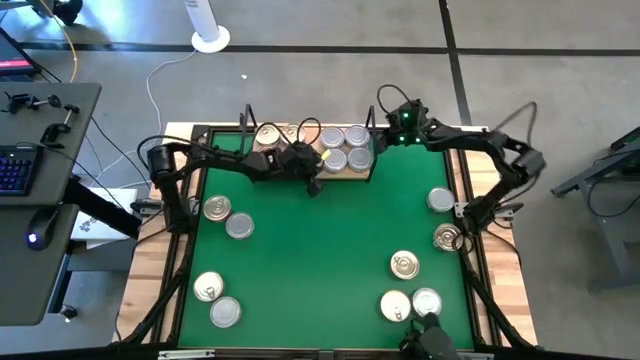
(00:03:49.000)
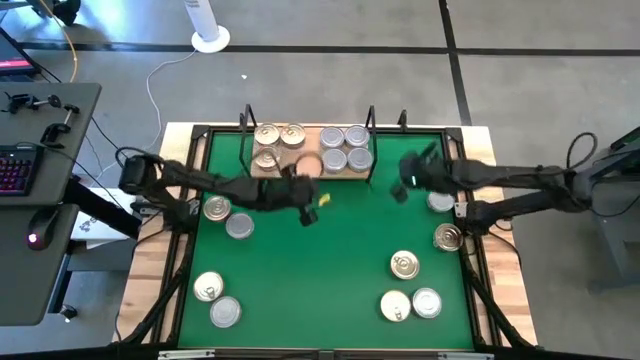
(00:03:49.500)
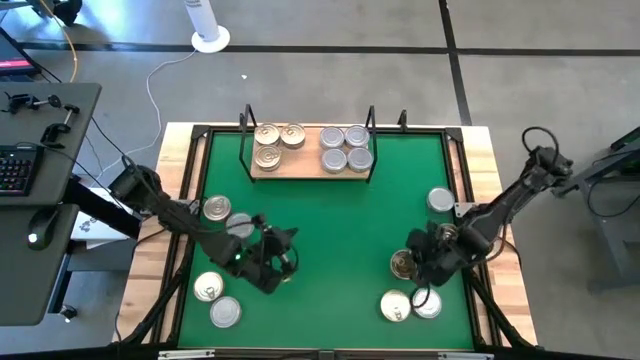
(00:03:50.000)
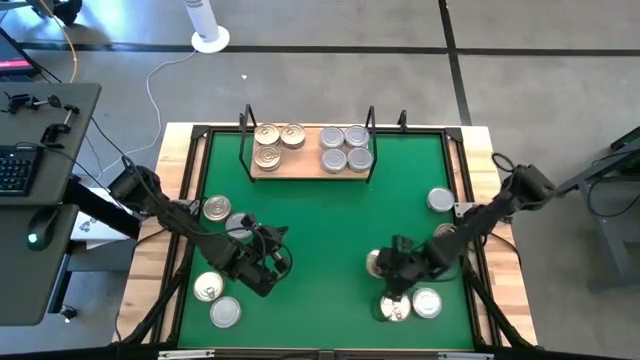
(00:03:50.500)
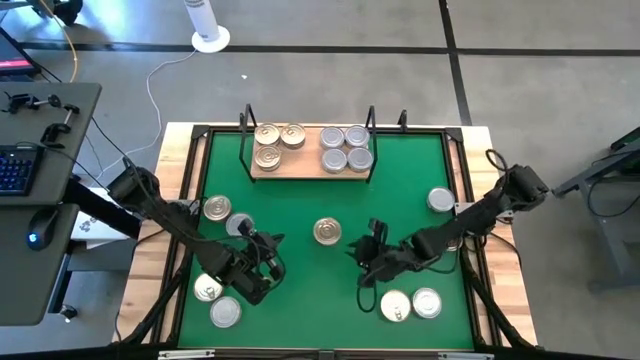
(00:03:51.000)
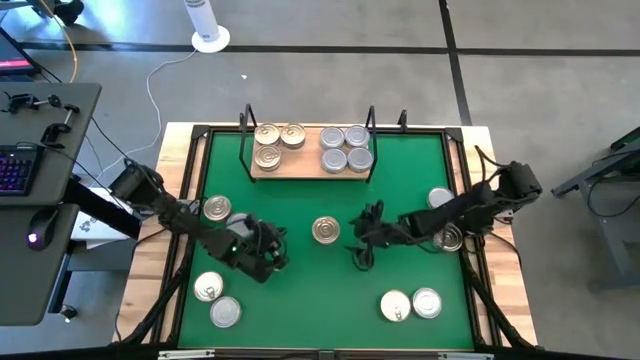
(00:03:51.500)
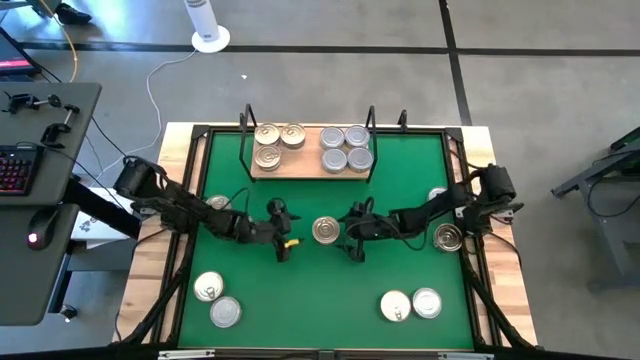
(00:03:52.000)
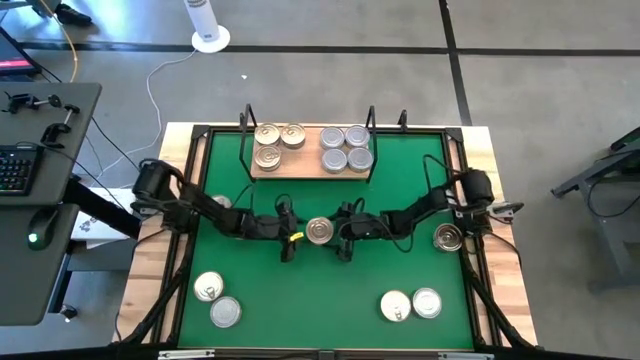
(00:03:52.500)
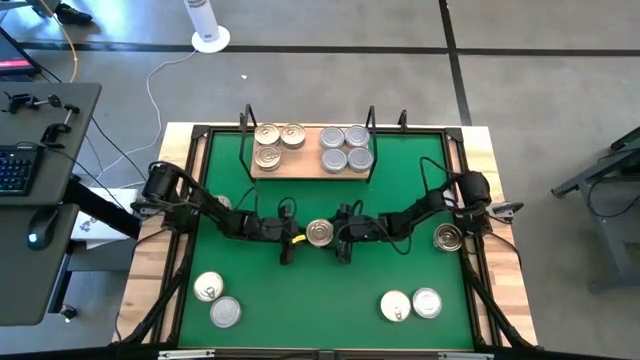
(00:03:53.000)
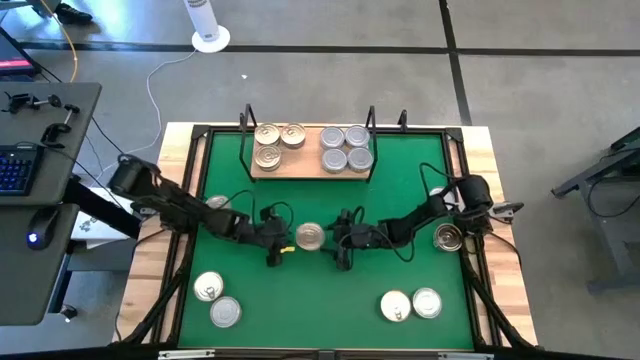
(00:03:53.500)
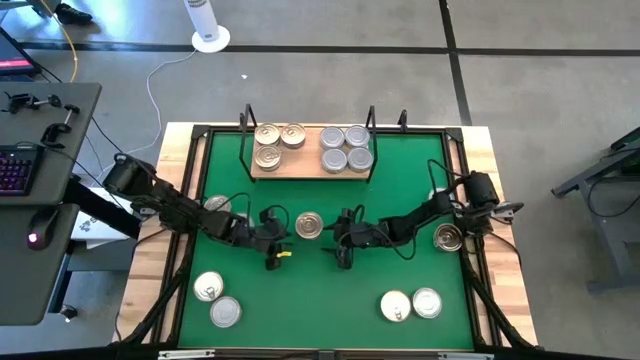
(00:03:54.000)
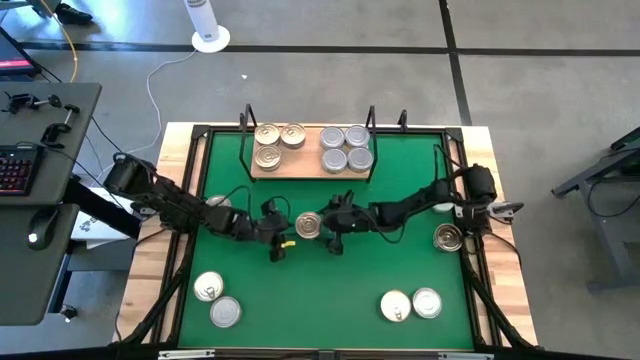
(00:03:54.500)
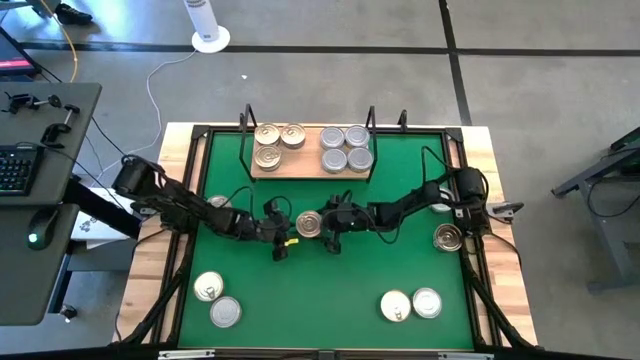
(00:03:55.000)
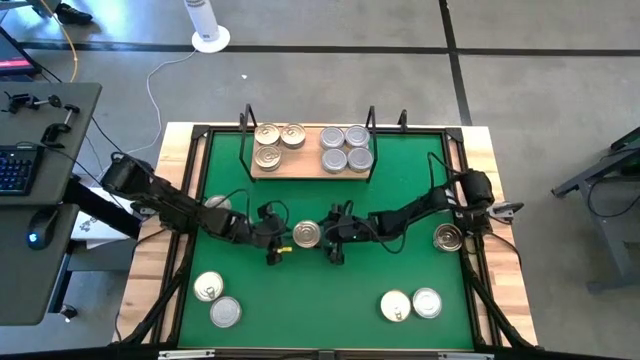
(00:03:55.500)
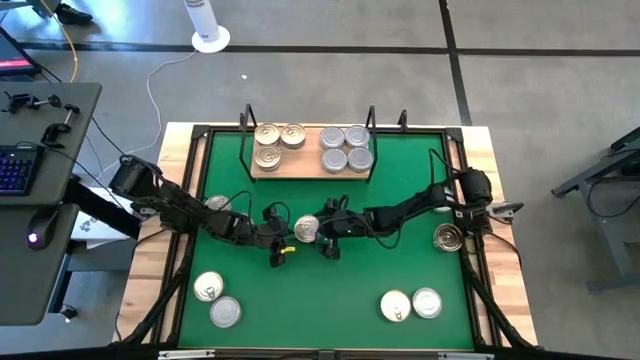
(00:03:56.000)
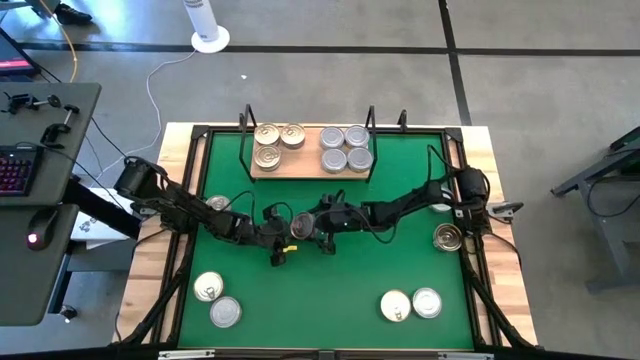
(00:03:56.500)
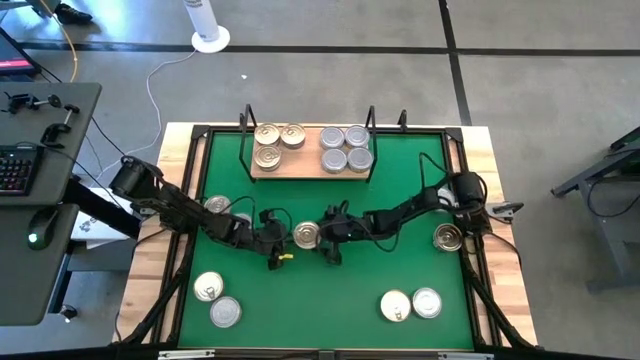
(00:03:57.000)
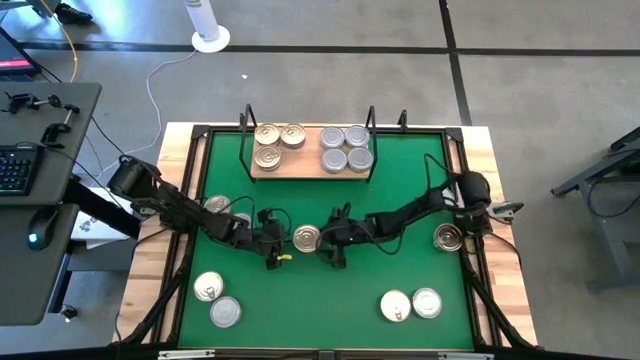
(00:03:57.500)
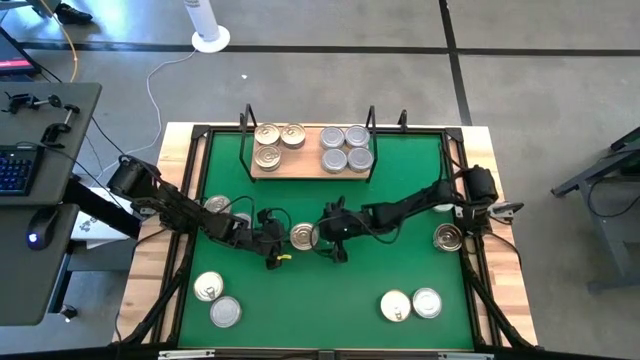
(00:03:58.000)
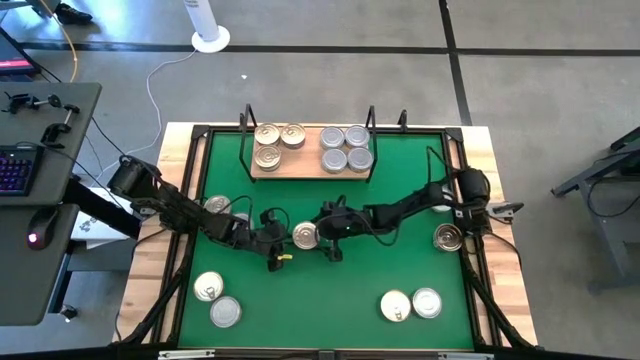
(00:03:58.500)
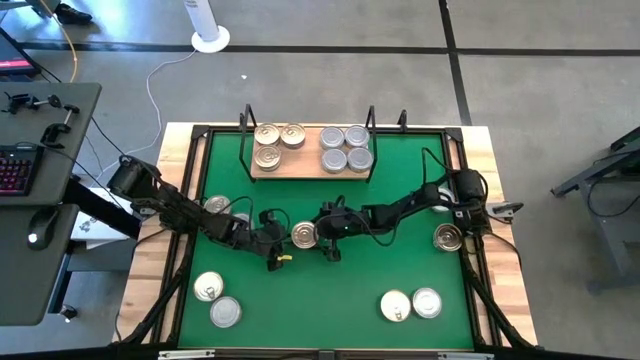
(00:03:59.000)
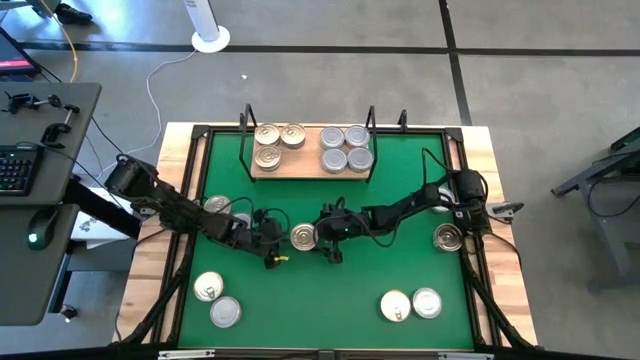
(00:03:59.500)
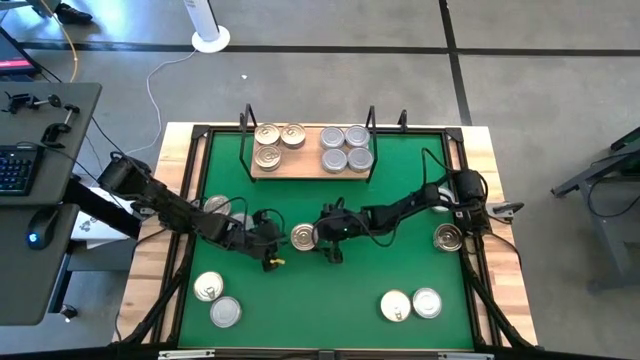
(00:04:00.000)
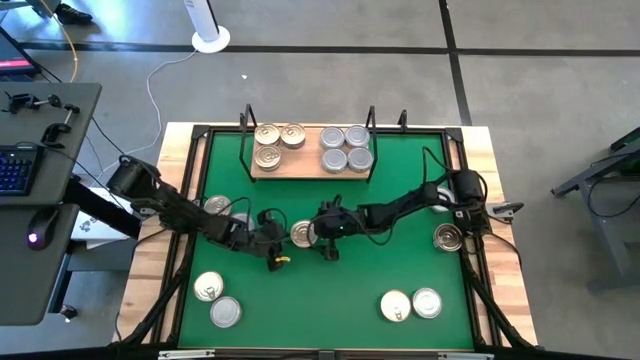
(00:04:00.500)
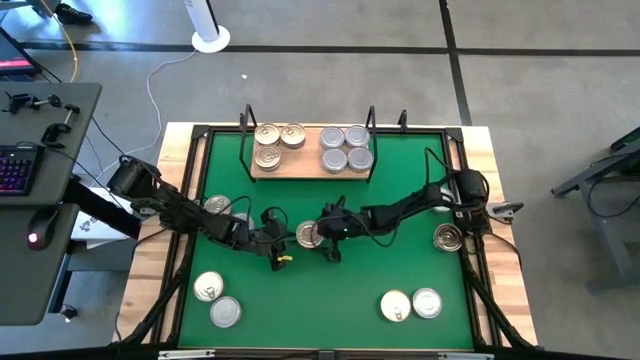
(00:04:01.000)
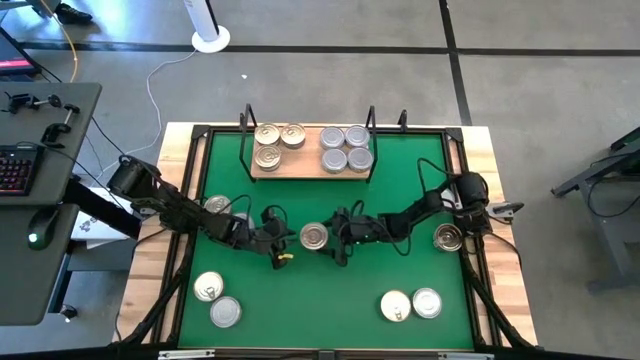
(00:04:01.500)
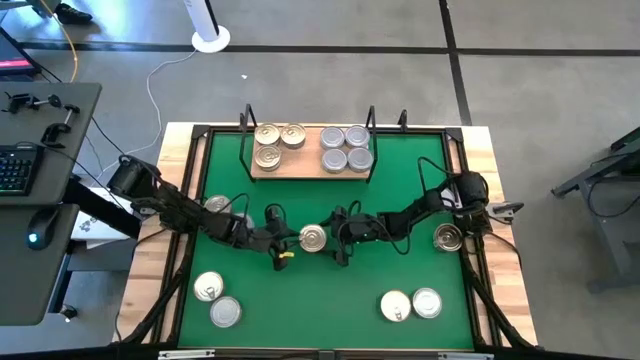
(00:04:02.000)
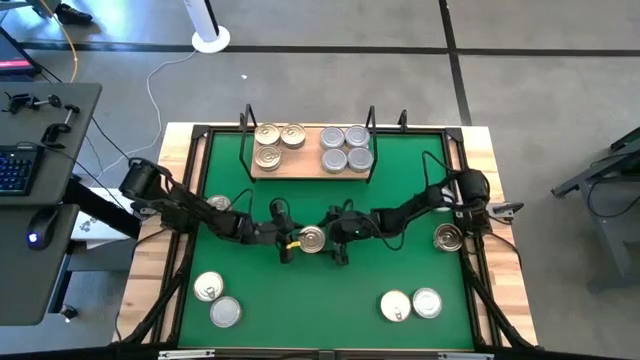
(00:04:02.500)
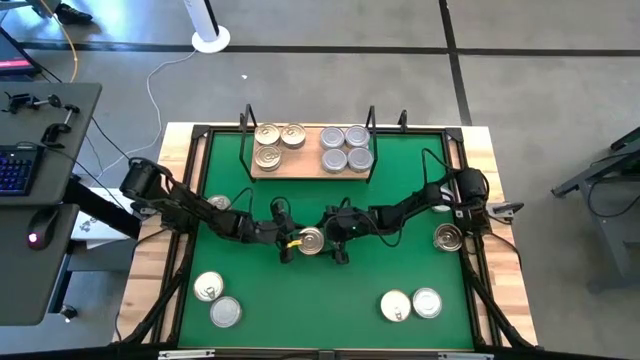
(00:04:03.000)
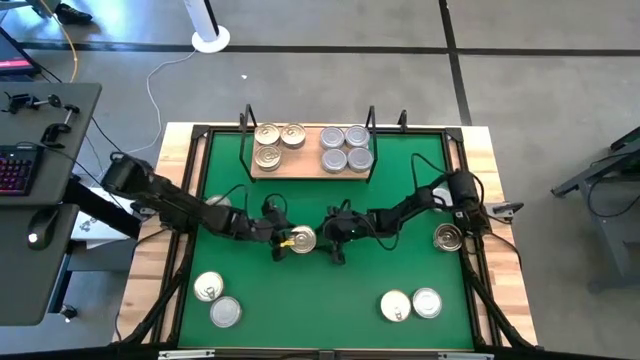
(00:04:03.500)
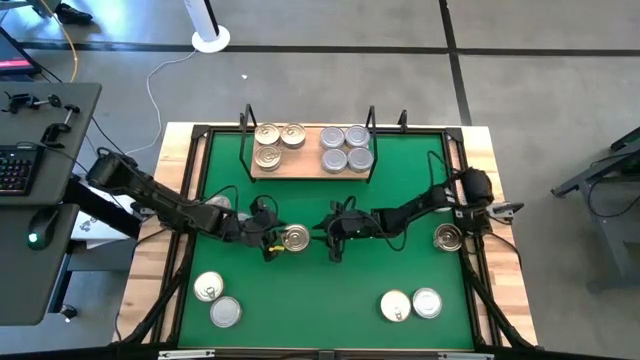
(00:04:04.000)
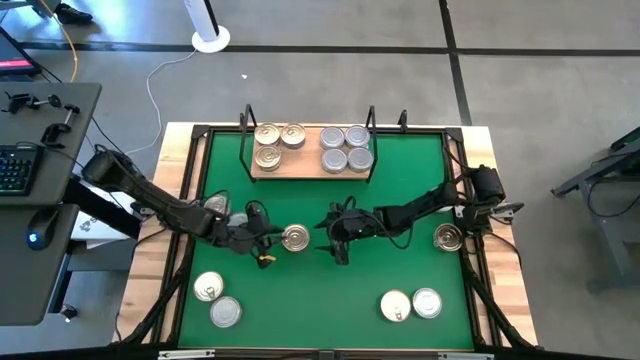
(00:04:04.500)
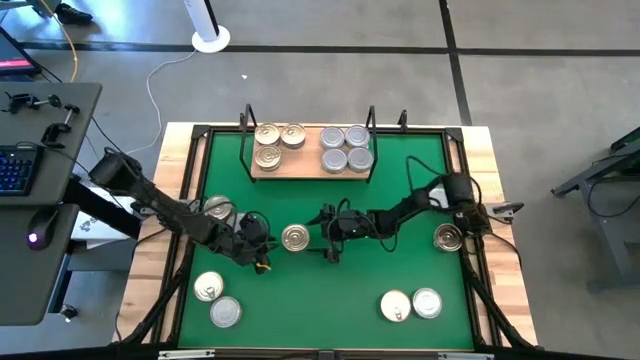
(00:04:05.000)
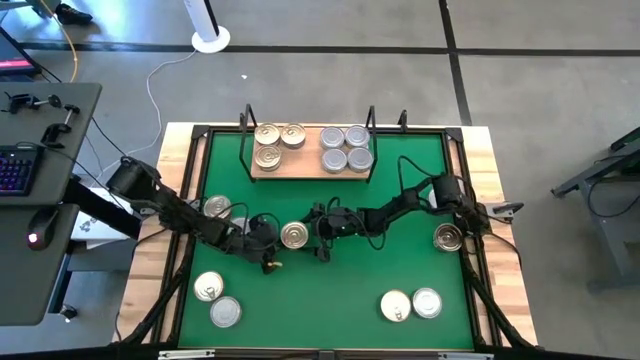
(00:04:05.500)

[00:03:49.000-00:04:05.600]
Task: Stack canned seafood by type on shelf
Put the blue/pink tuna can on the shelf and align with the other blue/pink tuna can

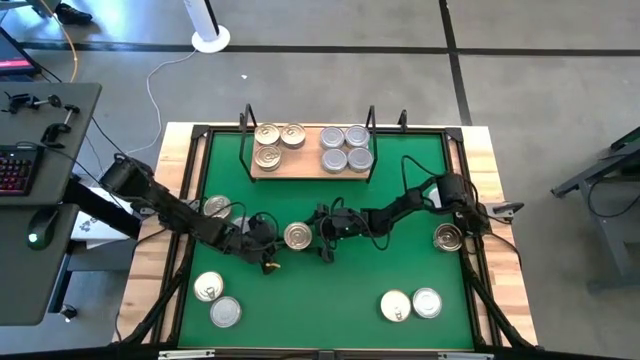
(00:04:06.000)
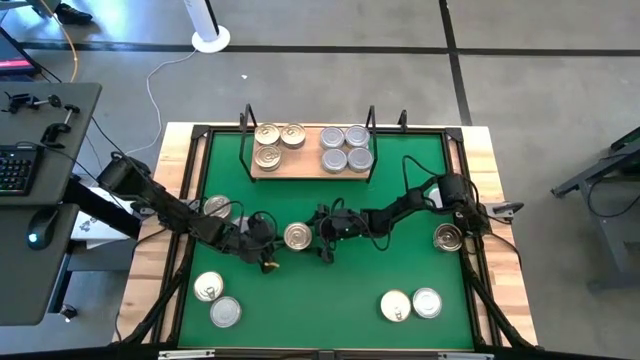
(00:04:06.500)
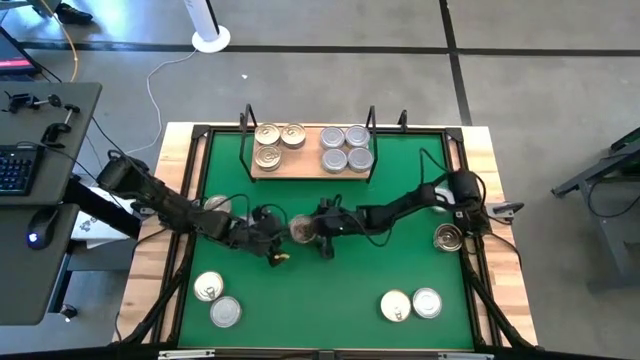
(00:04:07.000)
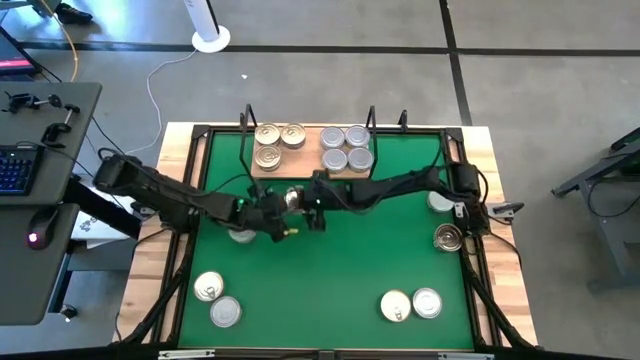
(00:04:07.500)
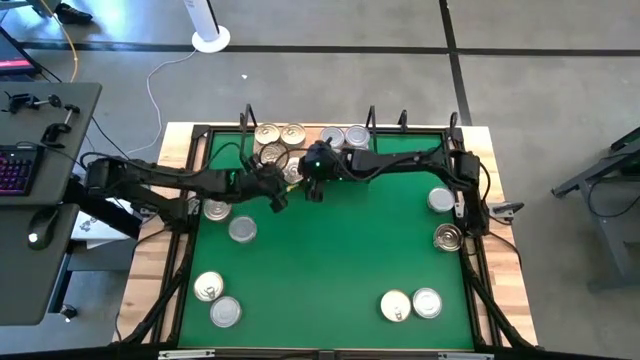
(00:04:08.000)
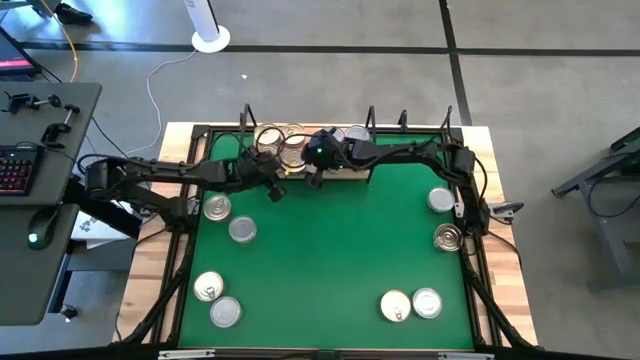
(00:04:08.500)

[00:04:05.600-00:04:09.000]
Put the blue/pink tuna can on the shelf and align with the other blue/pink tuna can

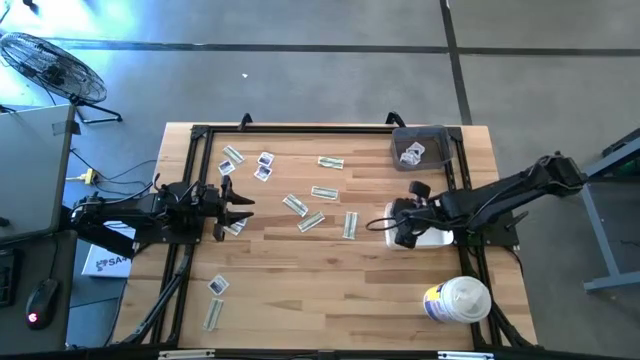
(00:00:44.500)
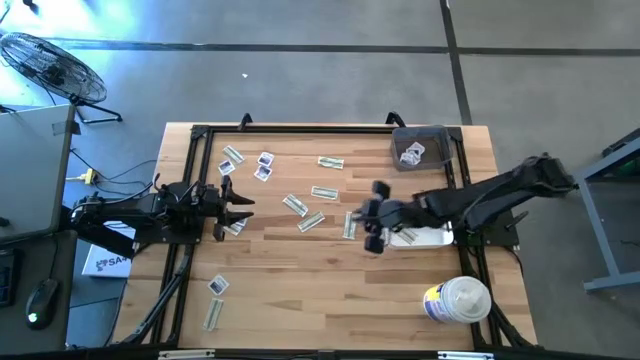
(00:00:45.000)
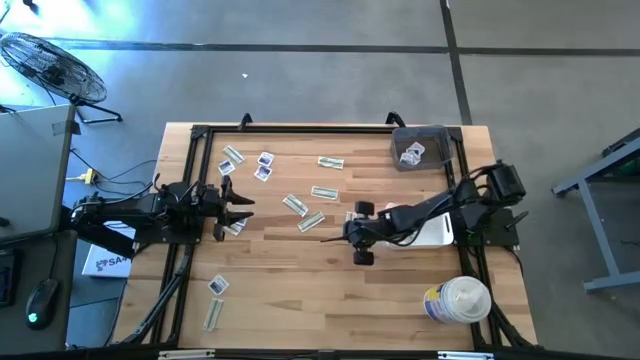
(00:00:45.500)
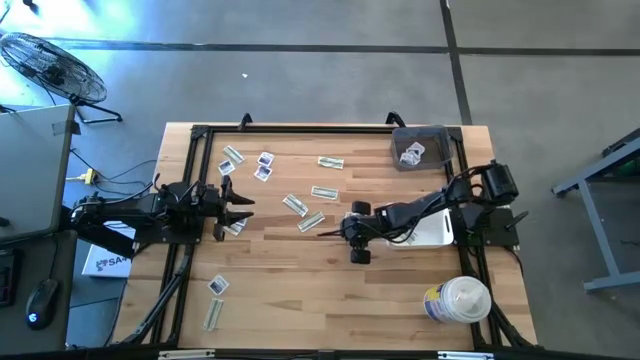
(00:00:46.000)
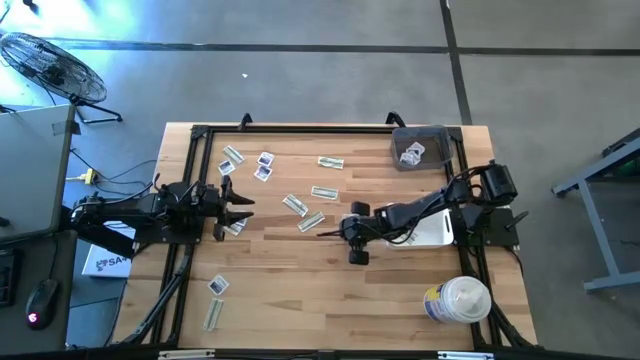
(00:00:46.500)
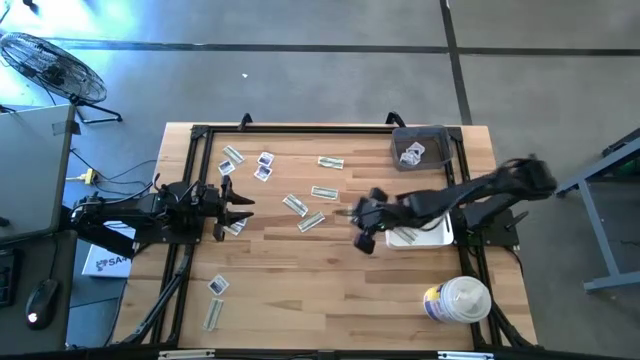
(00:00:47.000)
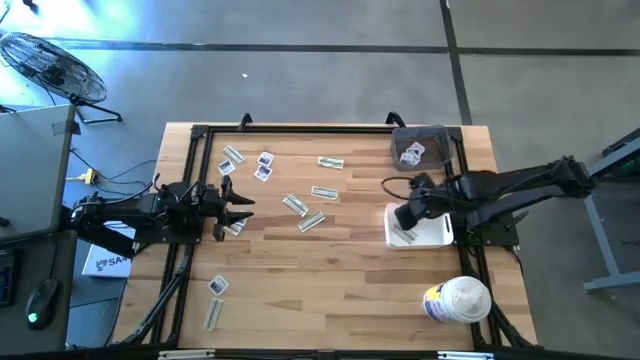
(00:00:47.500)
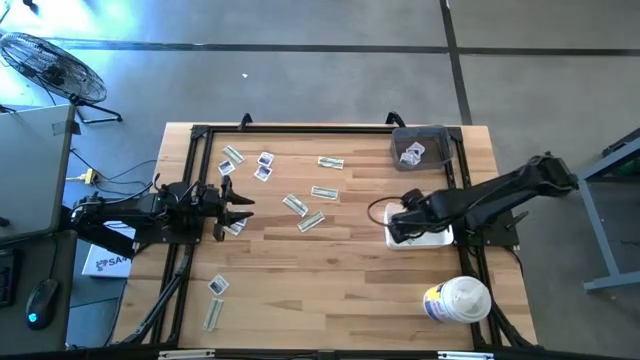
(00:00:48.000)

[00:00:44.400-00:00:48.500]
Task: Pick & Place First Aid Supplies
Put the bandage into the white bin
